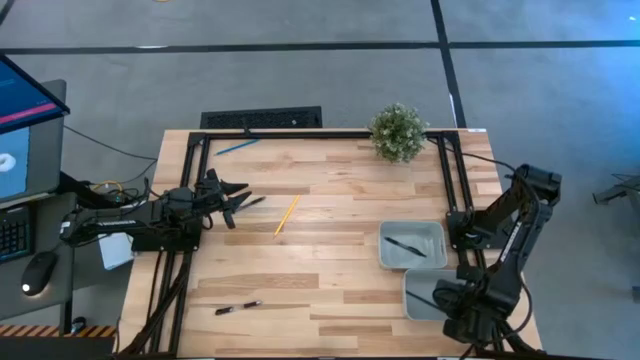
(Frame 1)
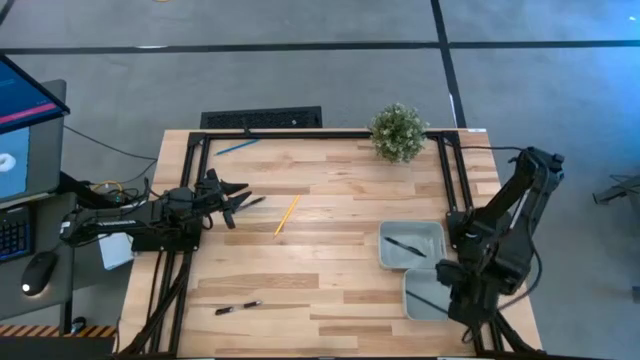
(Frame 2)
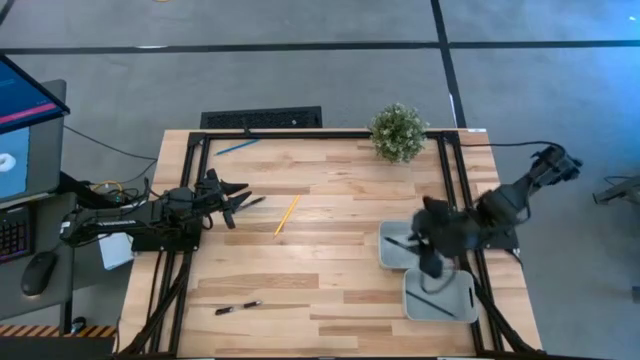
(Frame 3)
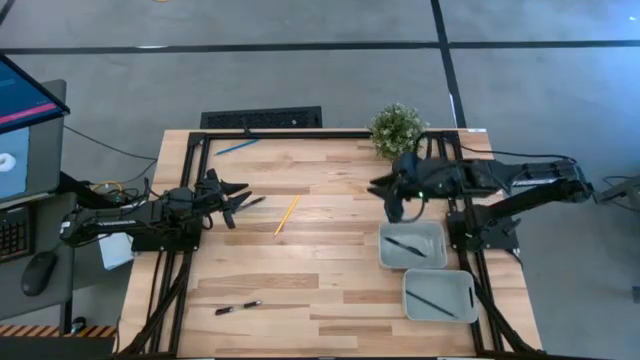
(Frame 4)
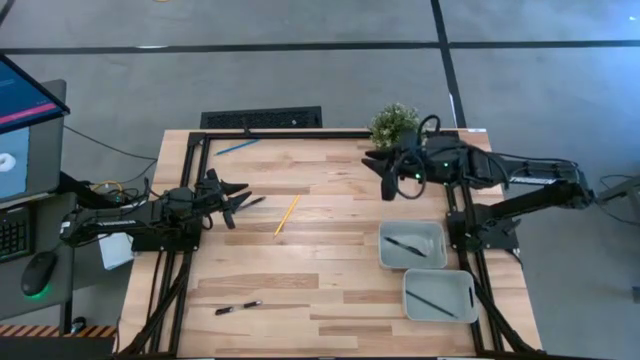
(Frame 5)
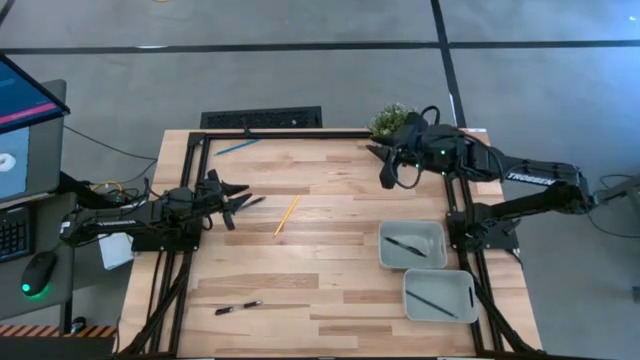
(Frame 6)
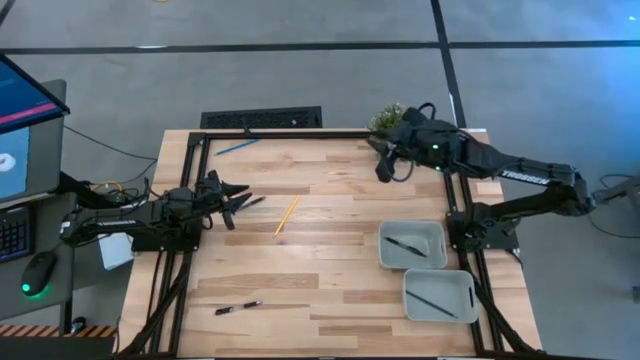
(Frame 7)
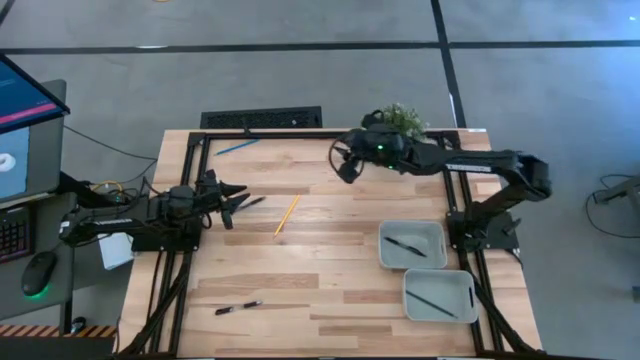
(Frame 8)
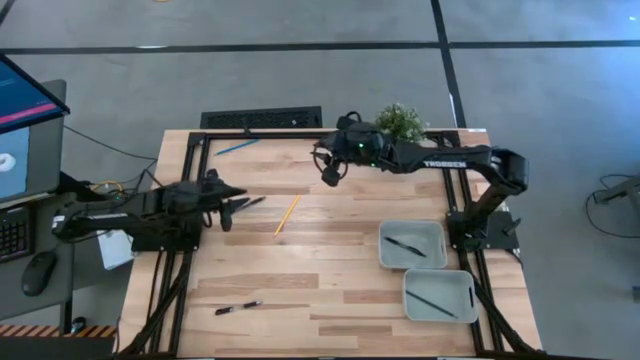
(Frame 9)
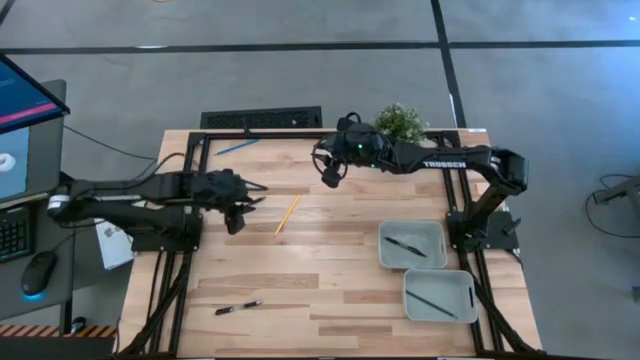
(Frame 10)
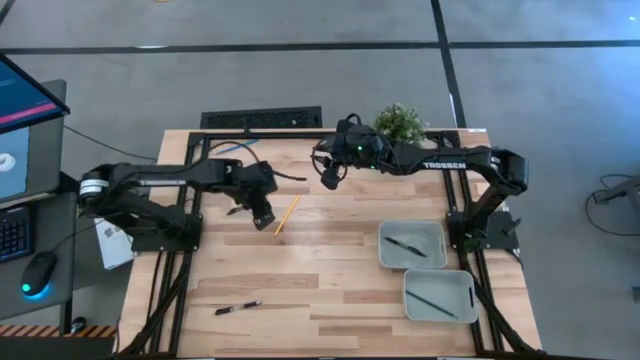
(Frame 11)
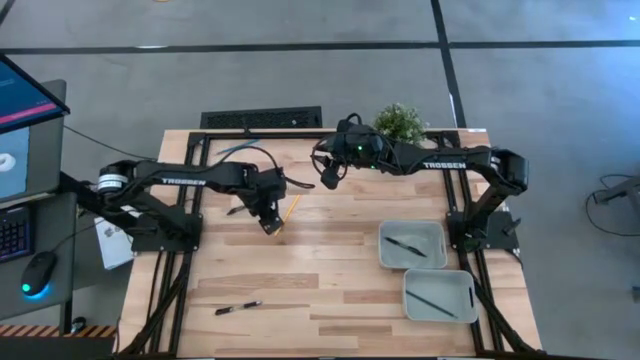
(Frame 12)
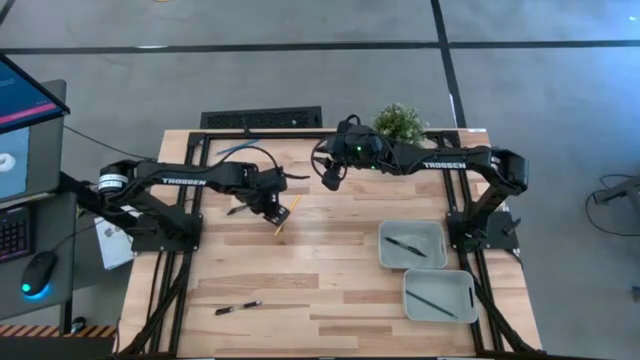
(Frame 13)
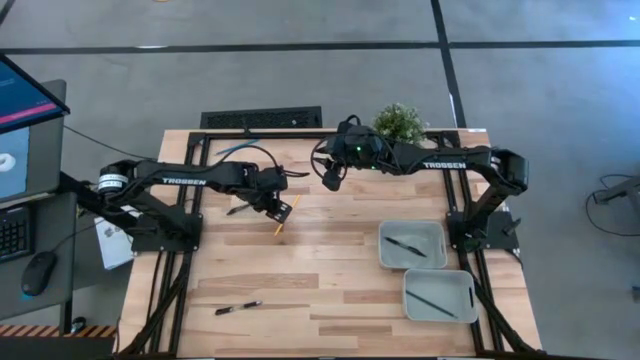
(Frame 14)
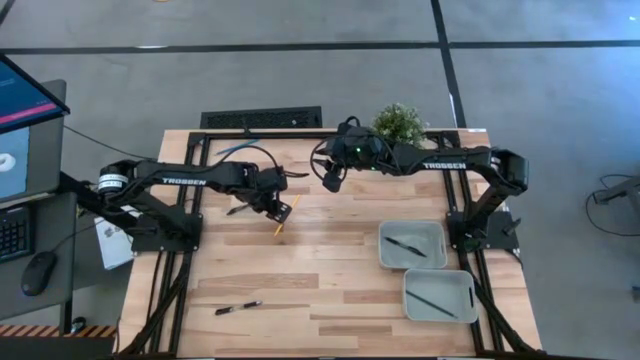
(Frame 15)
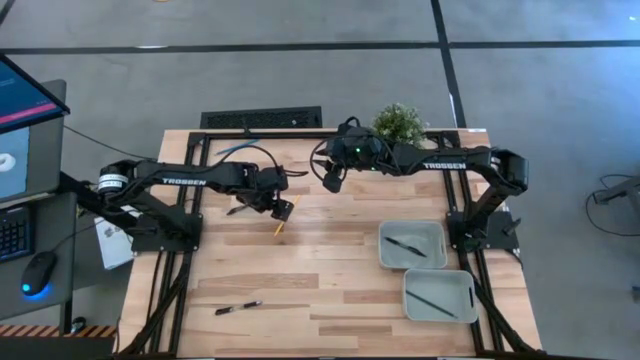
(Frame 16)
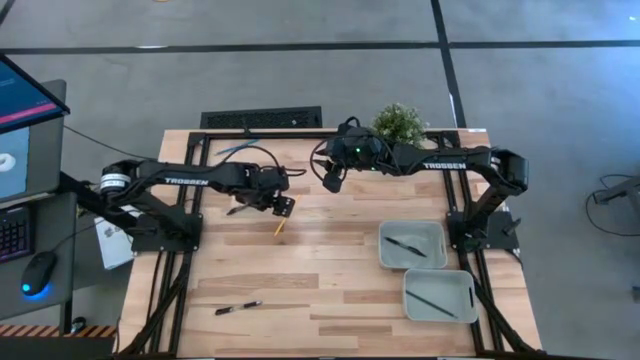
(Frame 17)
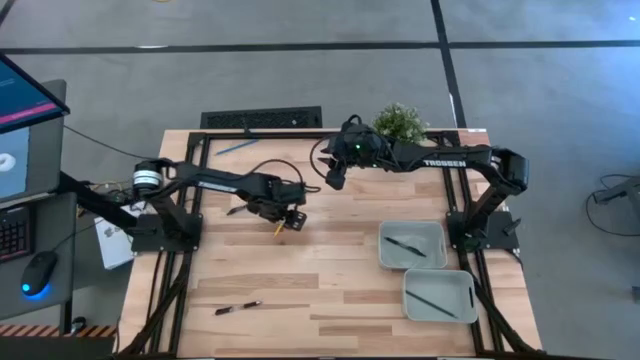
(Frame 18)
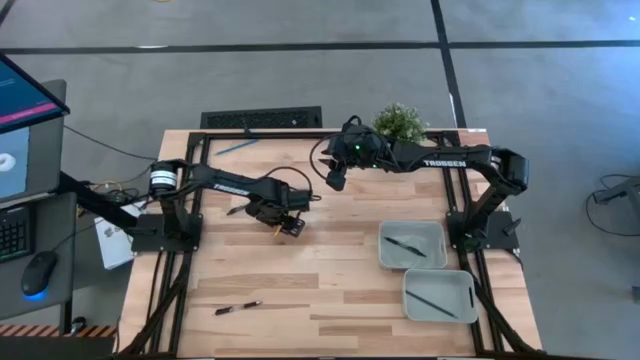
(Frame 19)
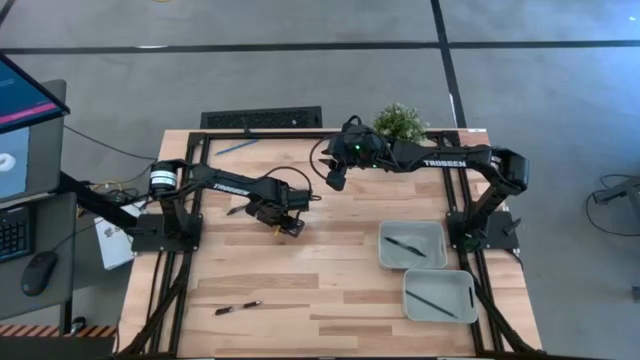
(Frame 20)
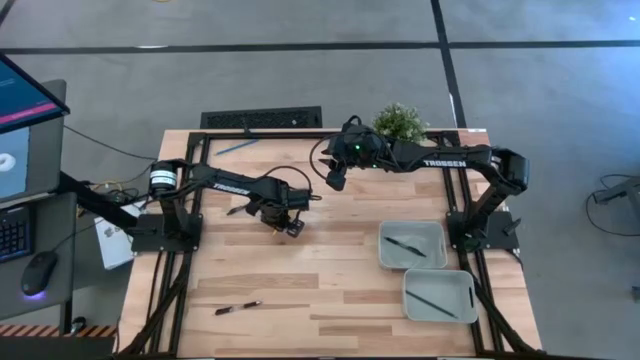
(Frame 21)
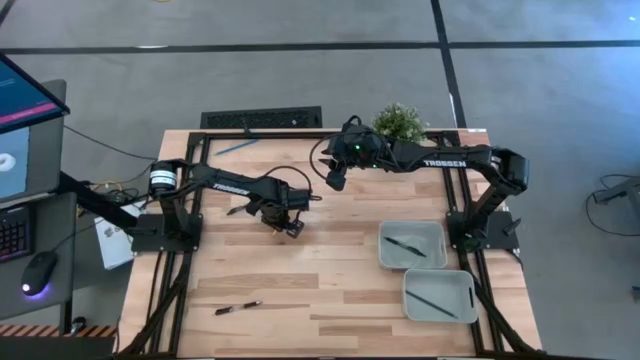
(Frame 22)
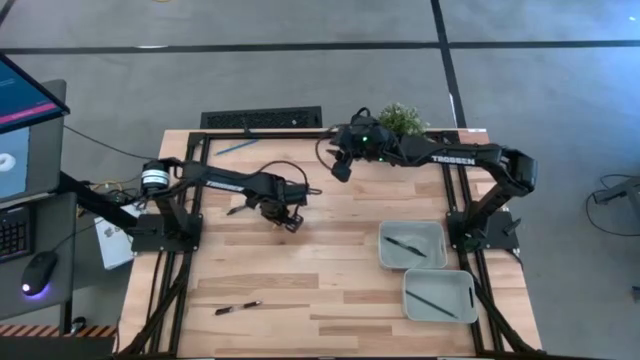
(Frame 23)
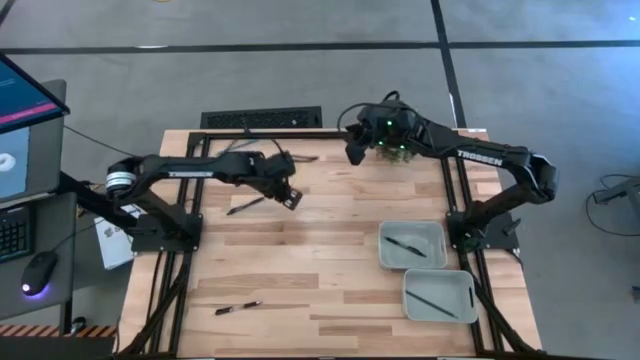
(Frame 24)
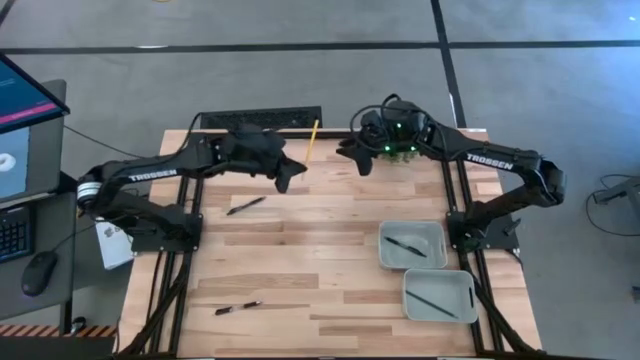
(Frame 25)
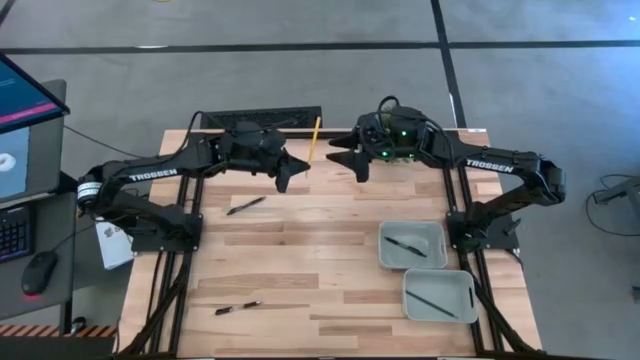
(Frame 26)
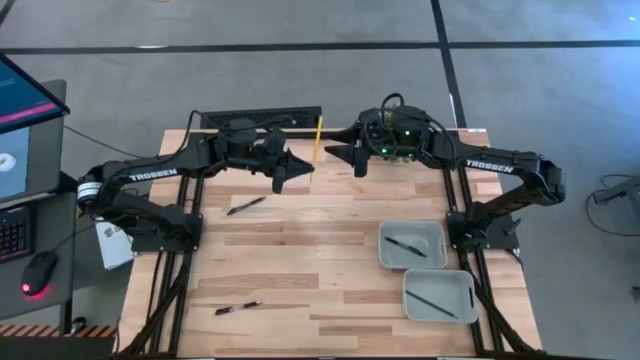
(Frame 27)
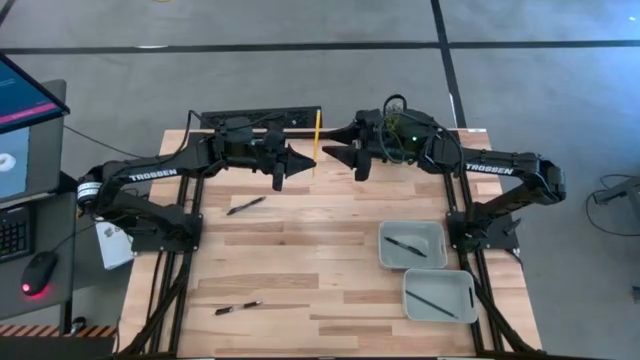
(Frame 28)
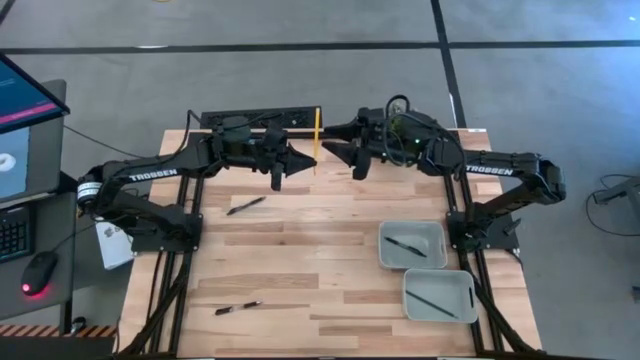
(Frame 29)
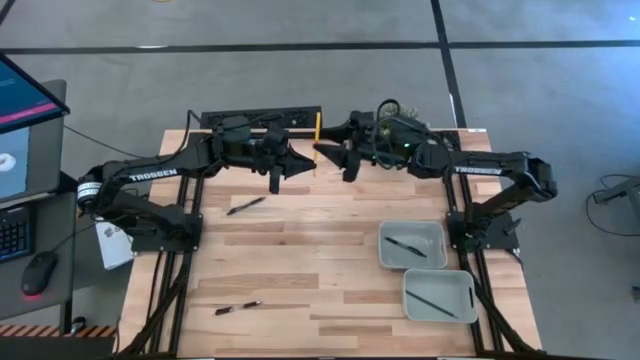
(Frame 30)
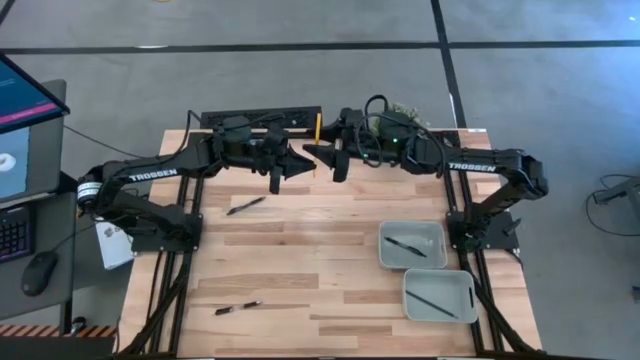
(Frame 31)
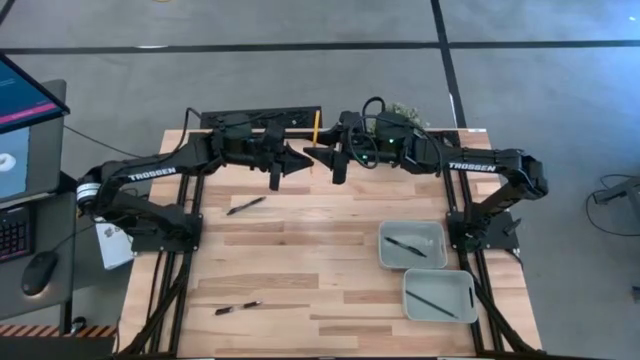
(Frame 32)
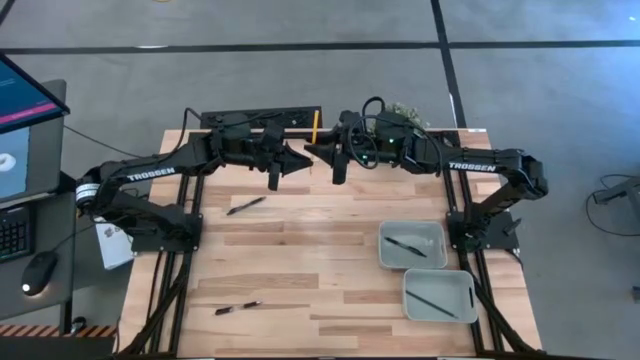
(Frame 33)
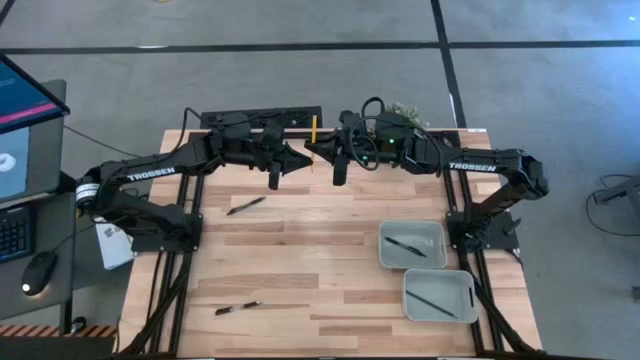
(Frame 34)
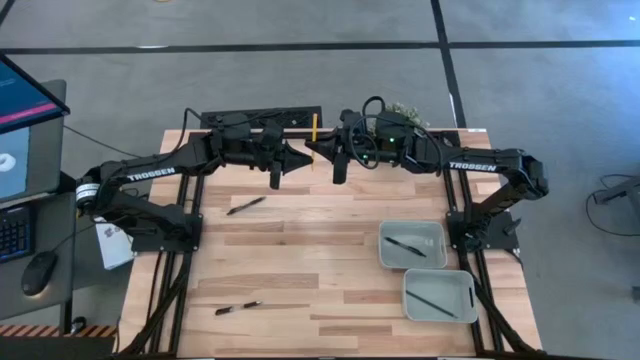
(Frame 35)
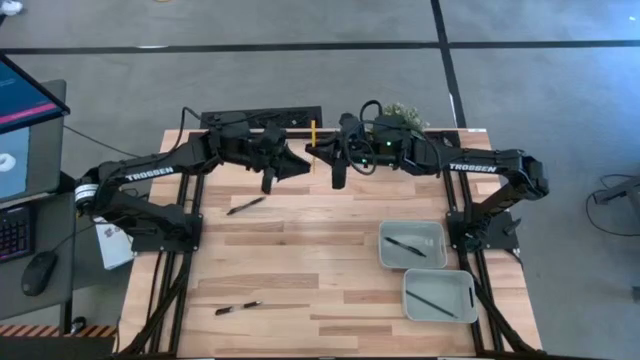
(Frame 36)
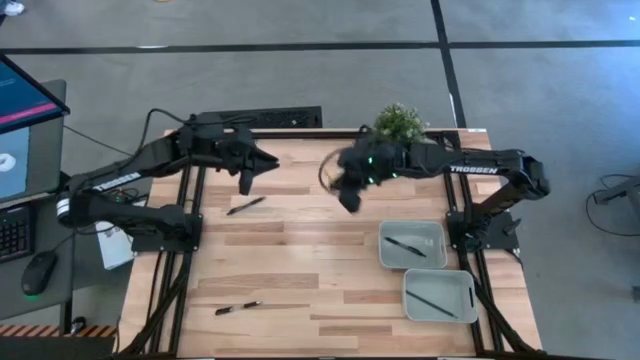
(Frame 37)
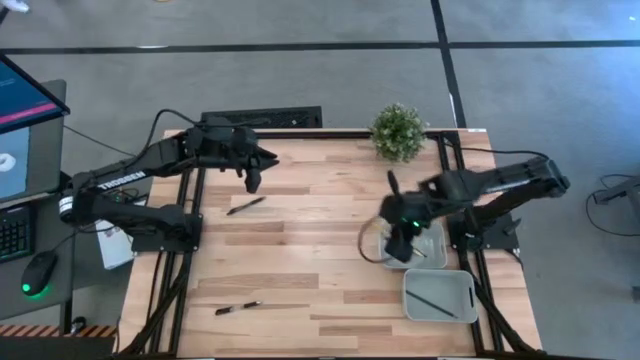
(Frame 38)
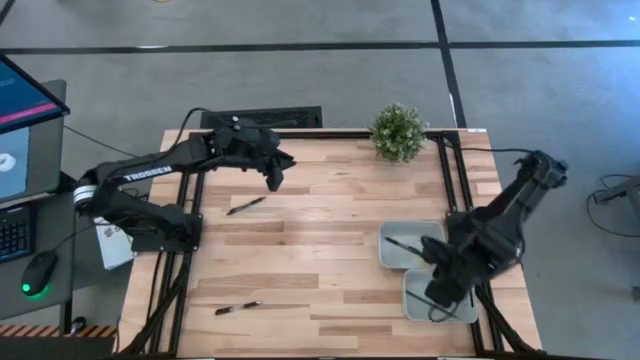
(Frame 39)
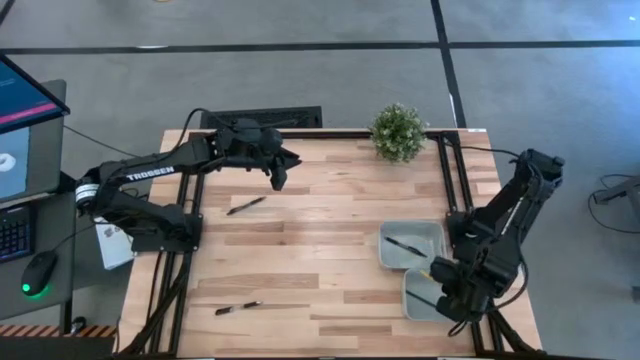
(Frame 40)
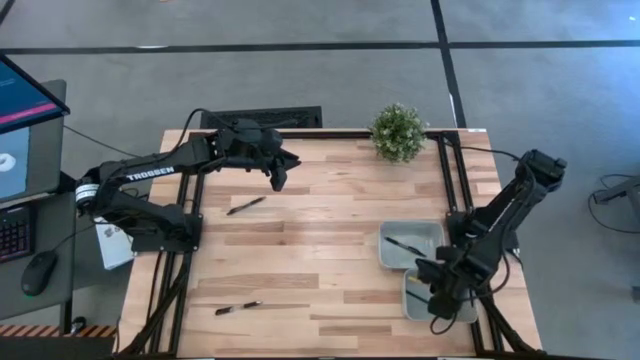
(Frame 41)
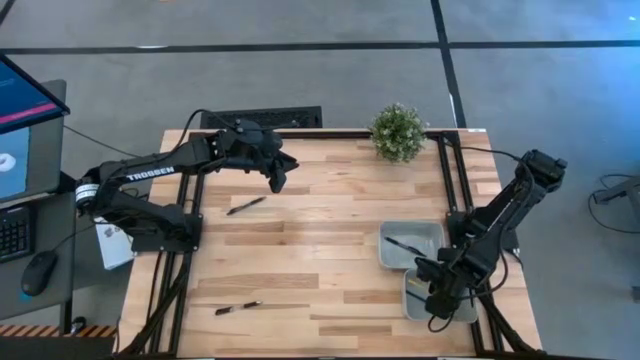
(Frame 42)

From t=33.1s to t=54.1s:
Task: Sort pens & pencils
Put the yellow pencil into the bottom gray bin
